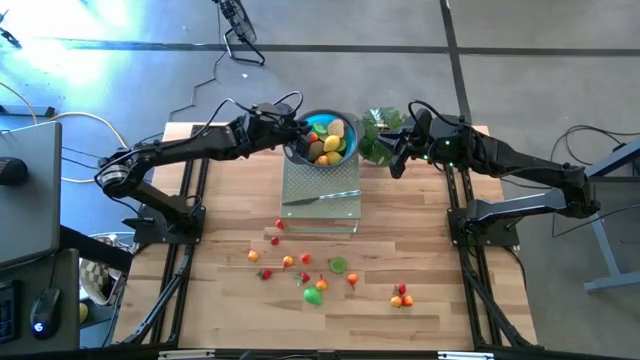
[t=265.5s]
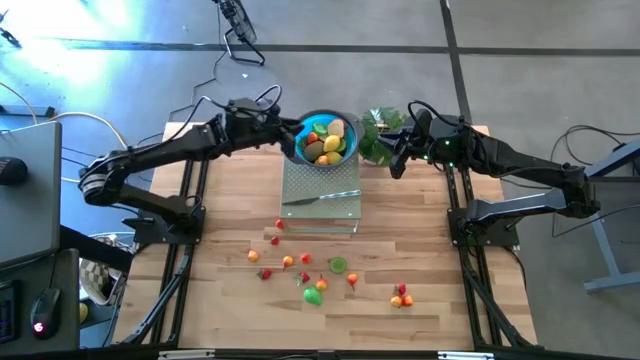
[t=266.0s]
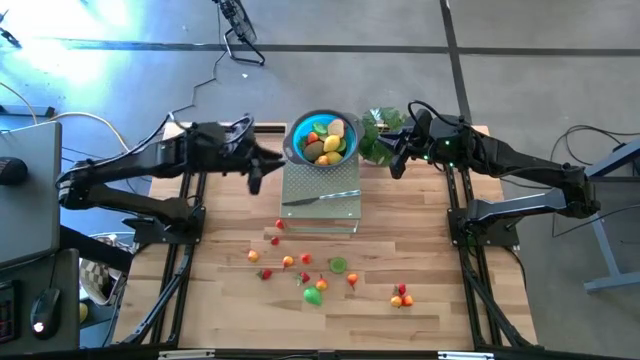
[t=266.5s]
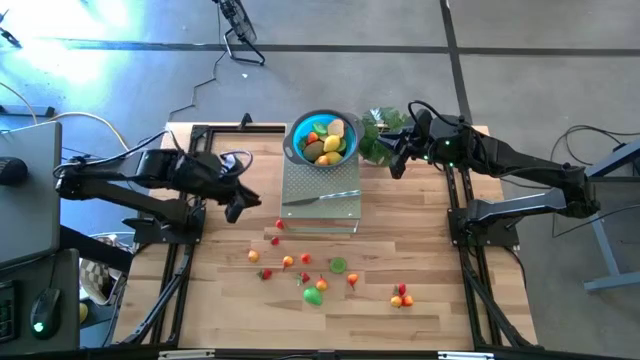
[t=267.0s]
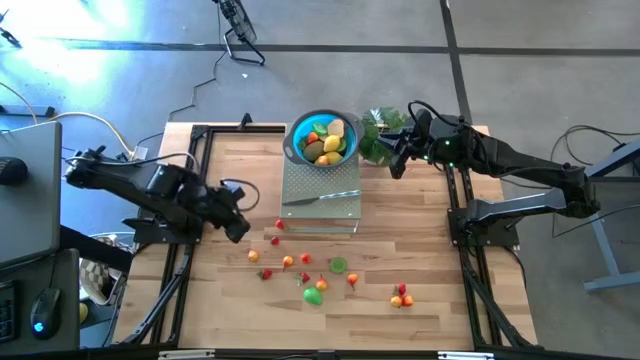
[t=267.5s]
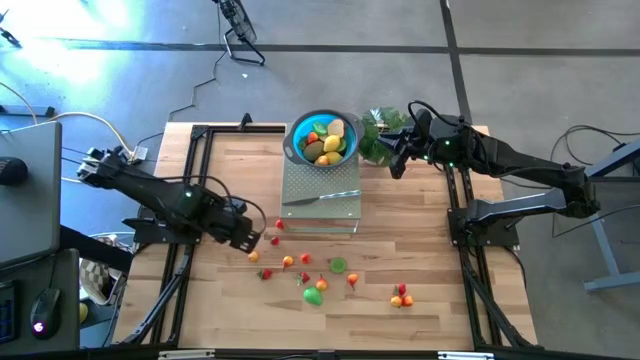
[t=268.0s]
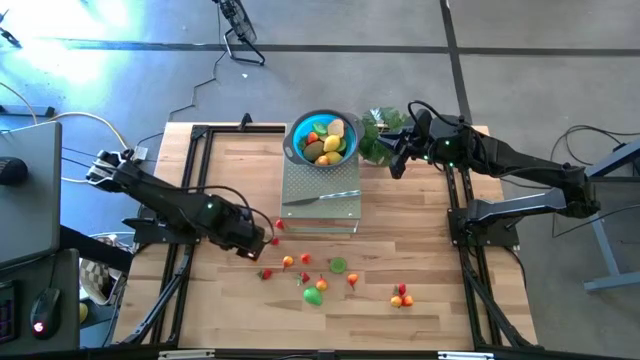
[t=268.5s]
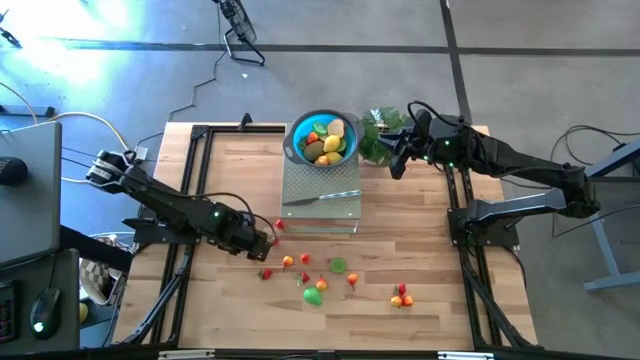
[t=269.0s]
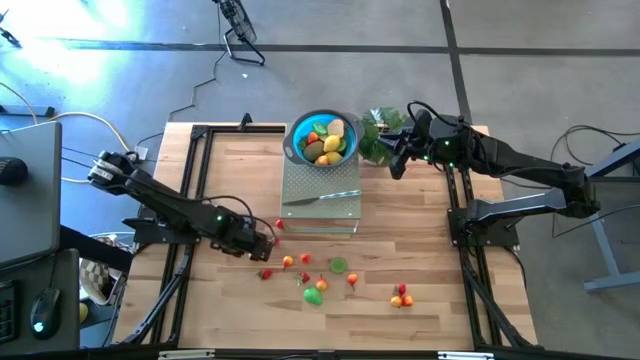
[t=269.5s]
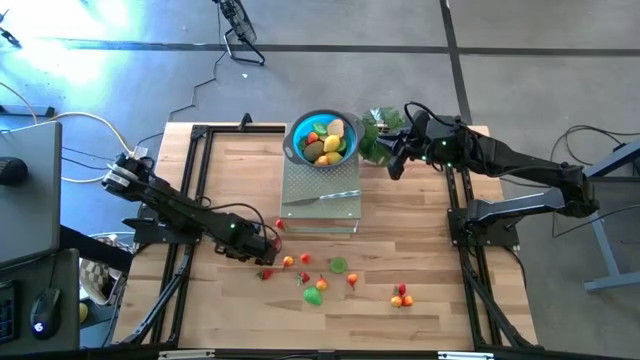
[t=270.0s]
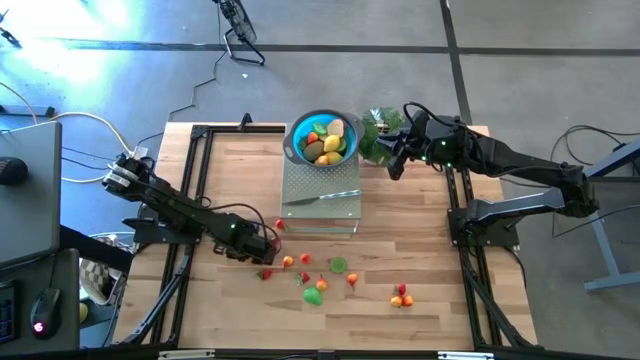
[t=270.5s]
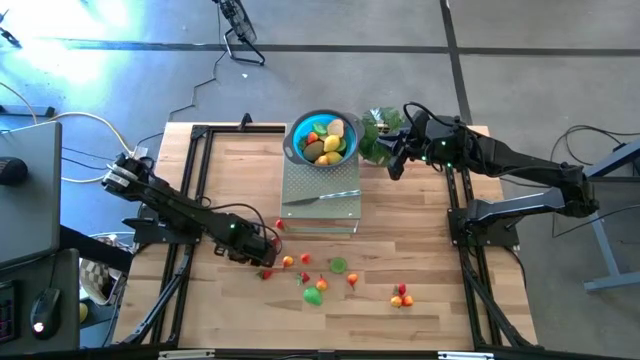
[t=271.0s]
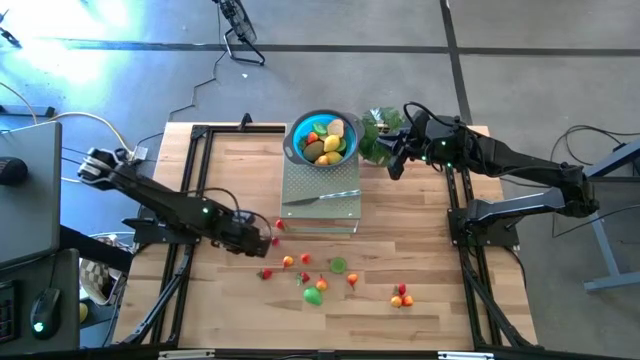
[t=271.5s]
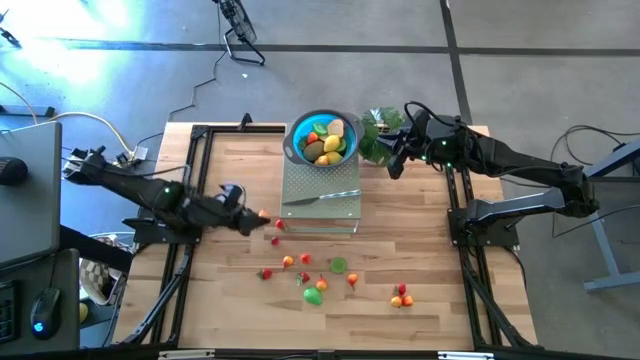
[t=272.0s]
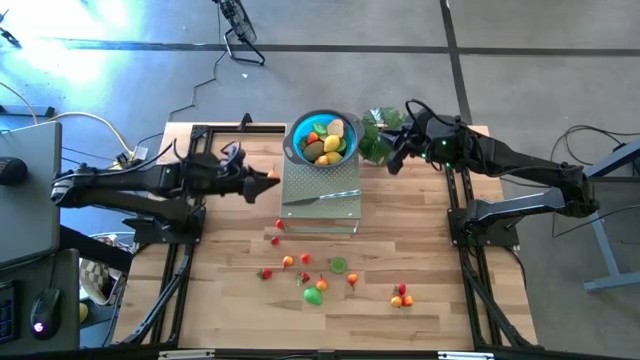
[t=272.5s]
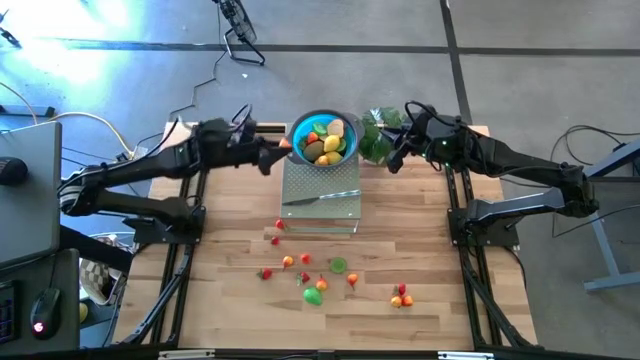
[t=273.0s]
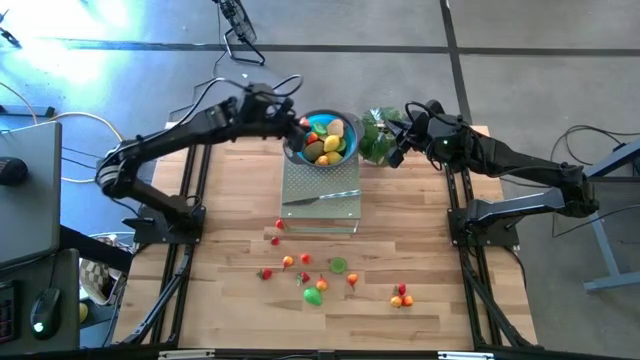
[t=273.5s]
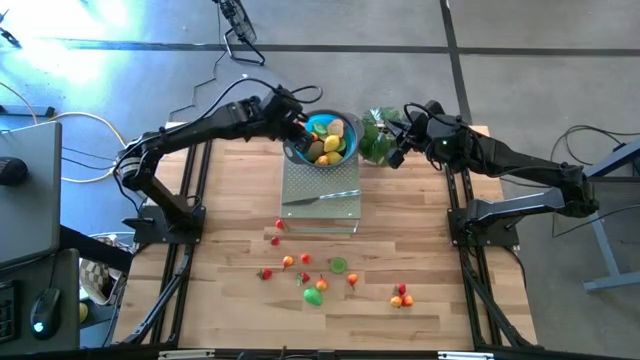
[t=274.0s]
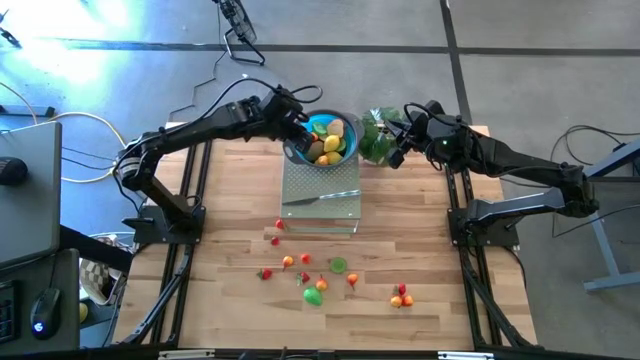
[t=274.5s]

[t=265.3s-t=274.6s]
Task: Pick & Place Fruit
Put the orange peach in the blue bowl on the shelf

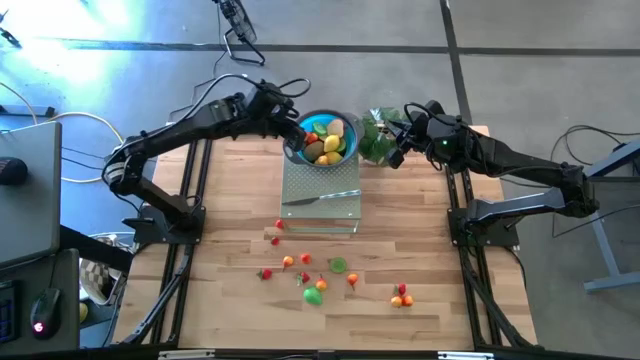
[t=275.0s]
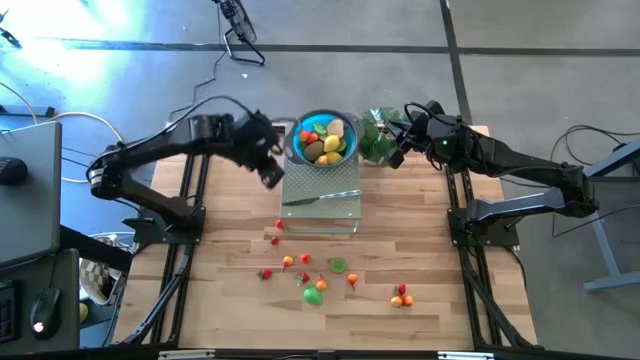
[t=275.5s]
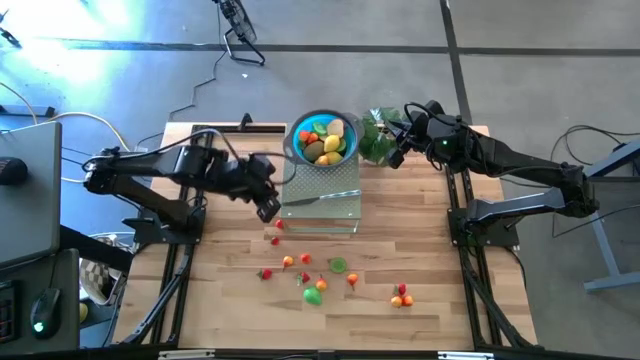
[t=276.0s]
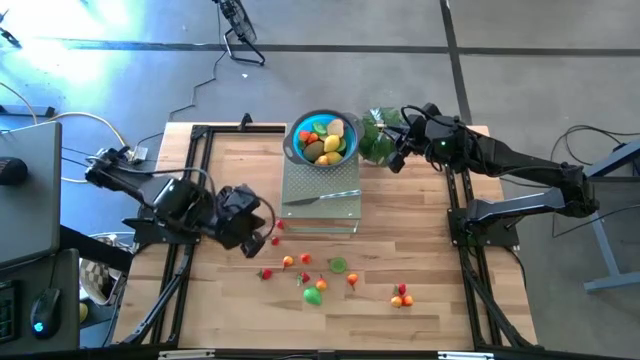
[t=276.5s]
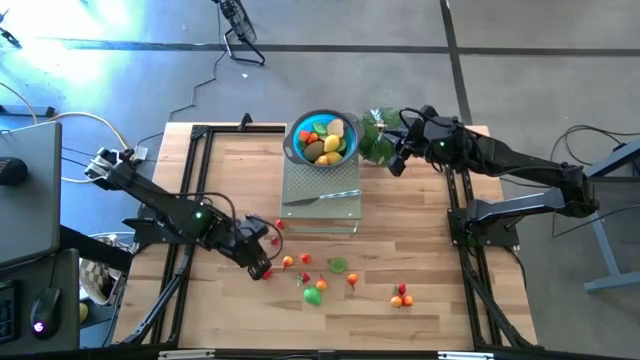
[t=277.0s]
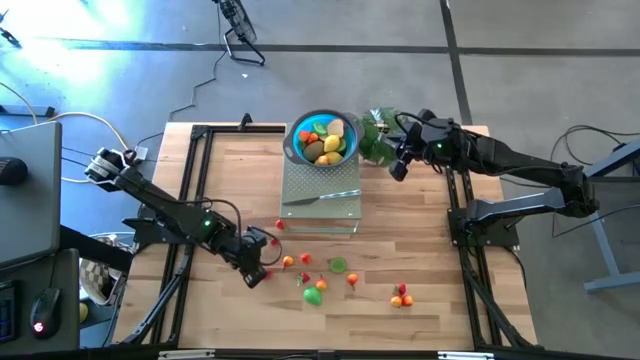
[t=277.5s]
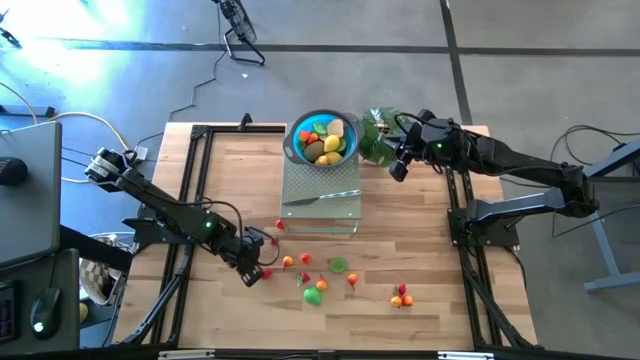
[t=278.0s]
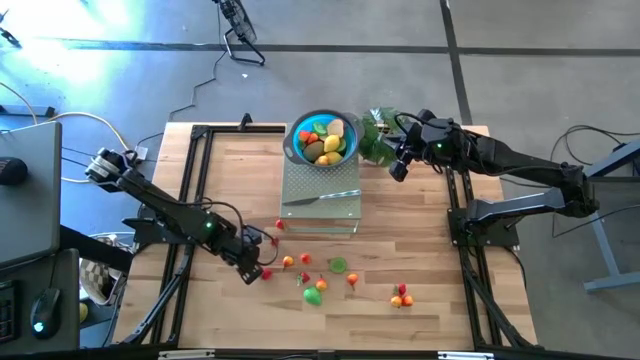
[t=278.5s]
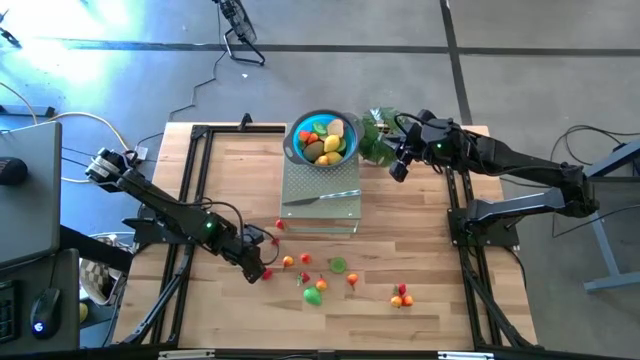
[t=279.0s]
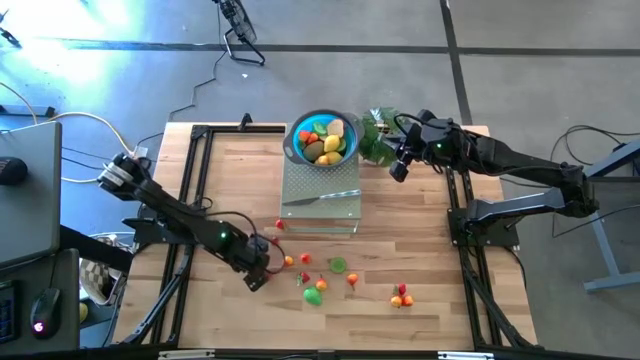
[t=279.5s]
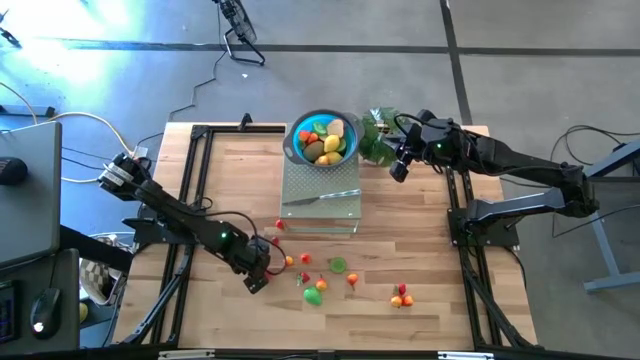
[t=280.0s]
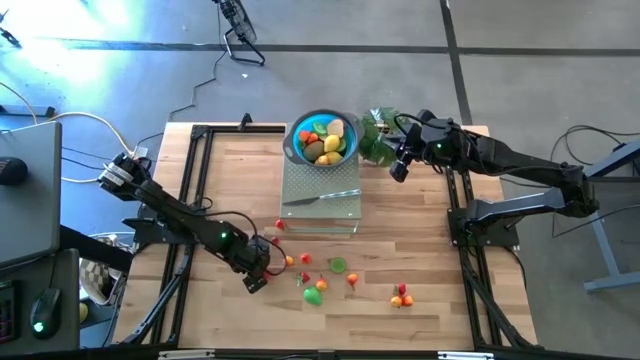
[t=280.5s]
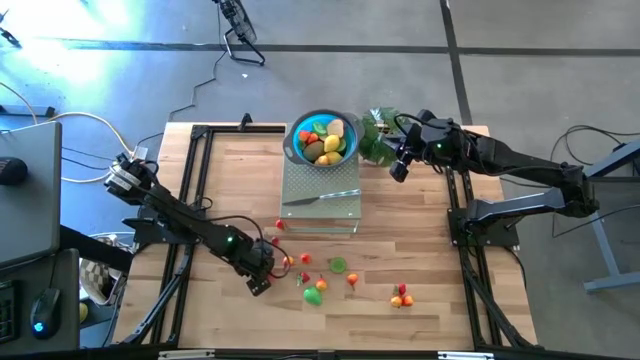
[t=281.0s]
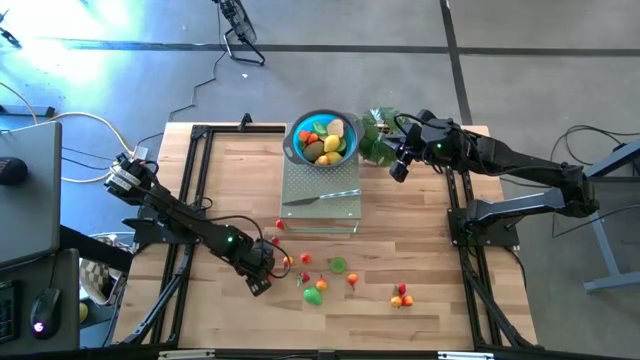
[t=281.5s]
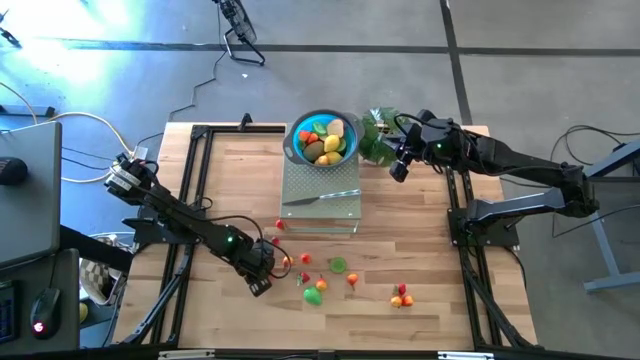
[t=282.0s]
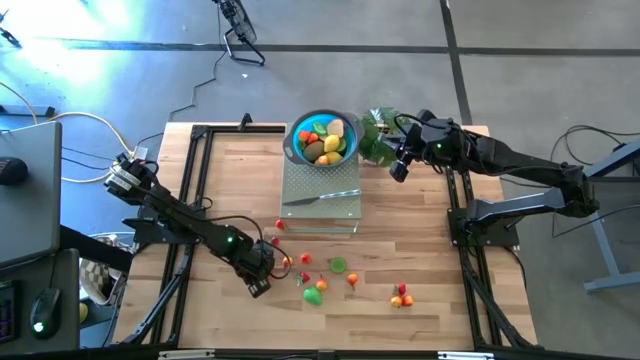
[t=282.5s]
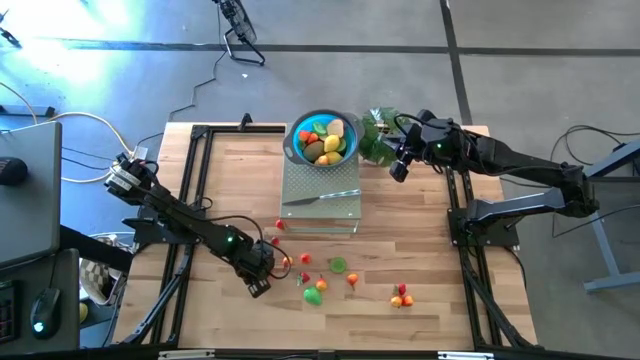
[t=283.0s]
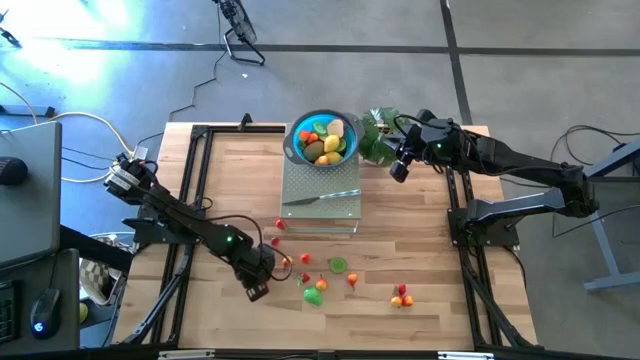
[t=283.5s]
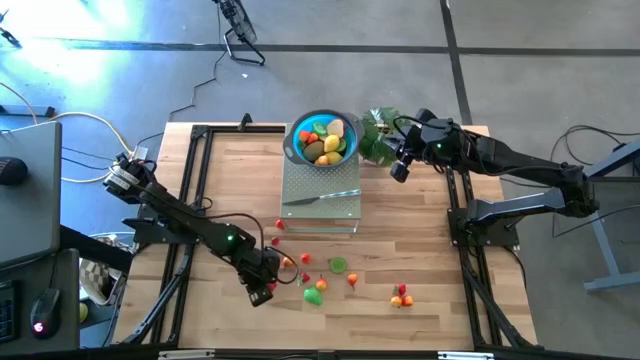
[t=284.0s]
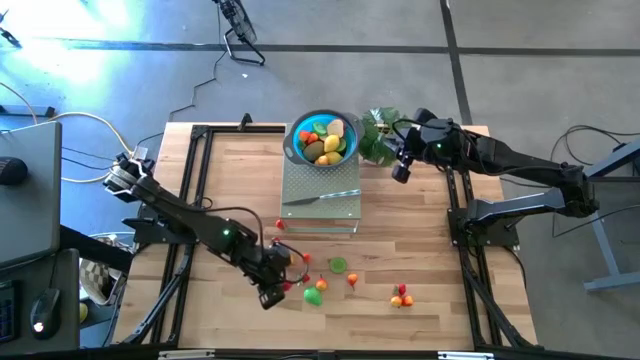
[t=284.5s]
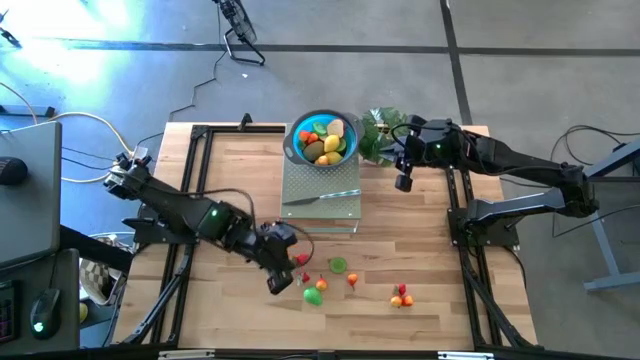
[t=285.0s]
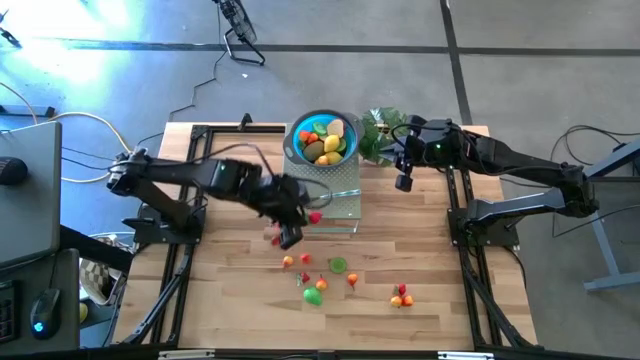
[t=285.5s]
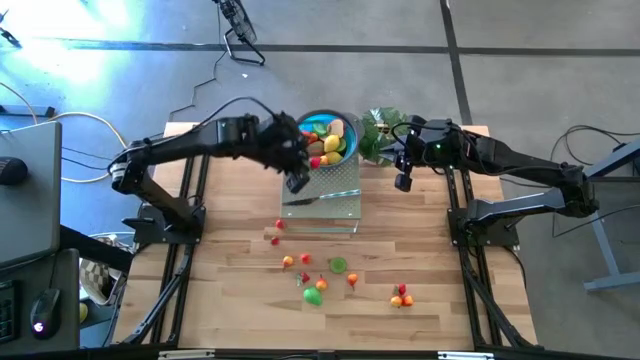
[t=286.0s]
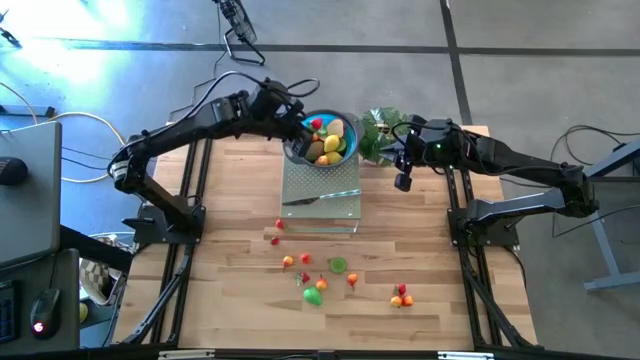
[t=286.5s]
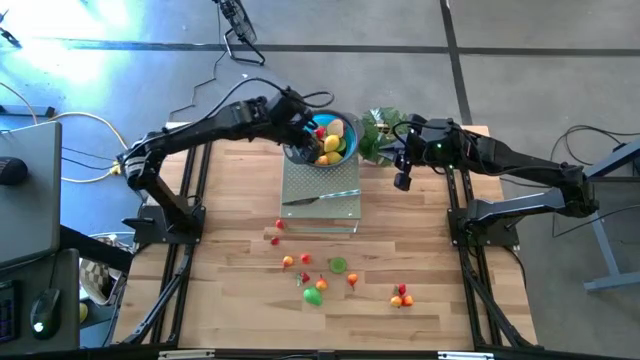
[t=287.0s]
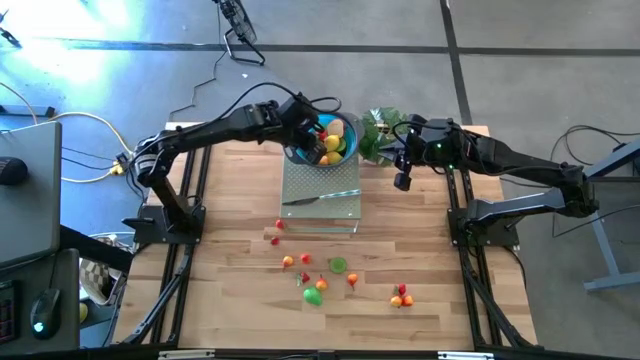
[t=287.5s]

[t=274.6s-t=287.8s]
Put the red strawberry in the blue bowl on the shelf
